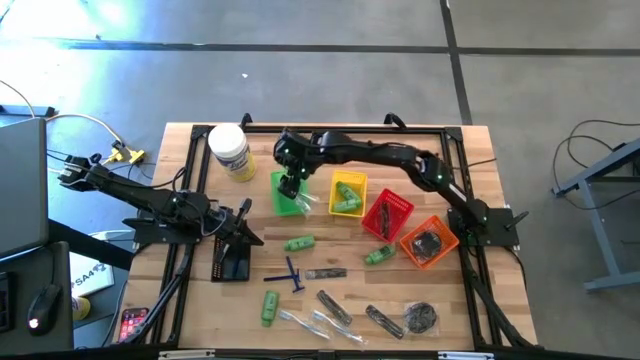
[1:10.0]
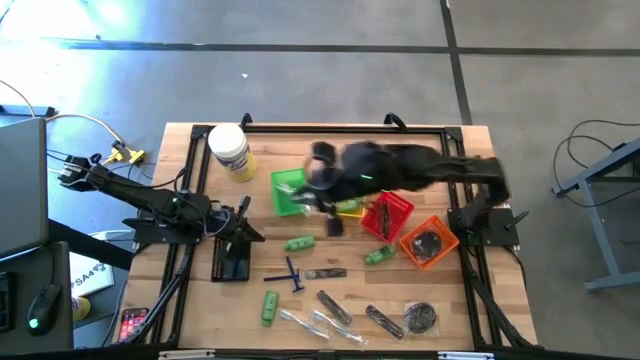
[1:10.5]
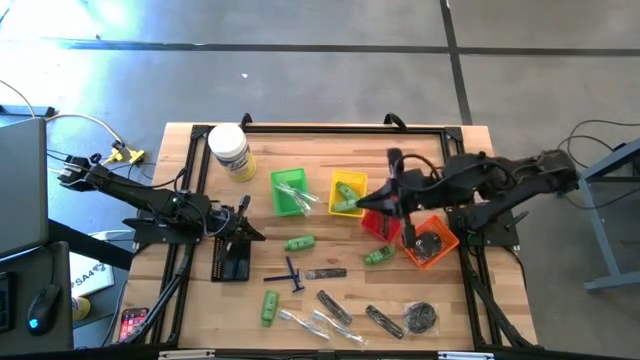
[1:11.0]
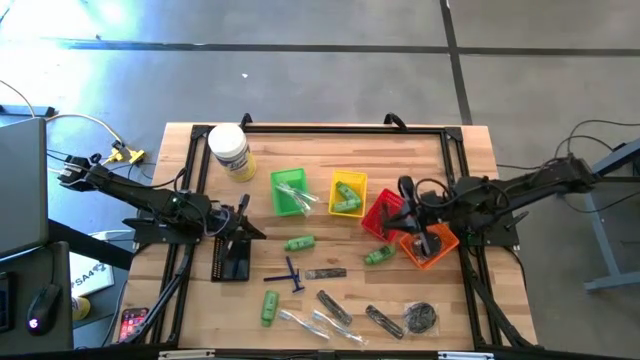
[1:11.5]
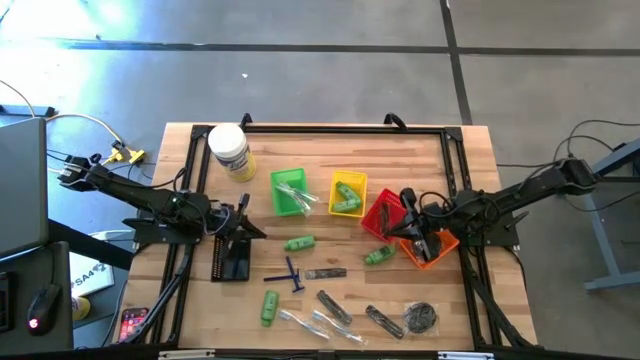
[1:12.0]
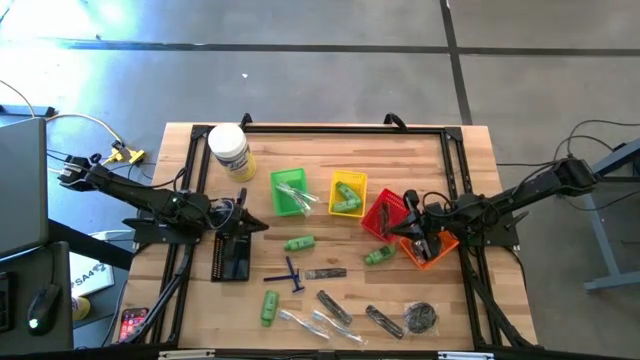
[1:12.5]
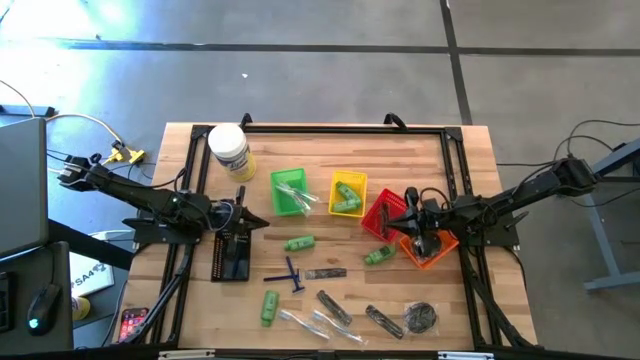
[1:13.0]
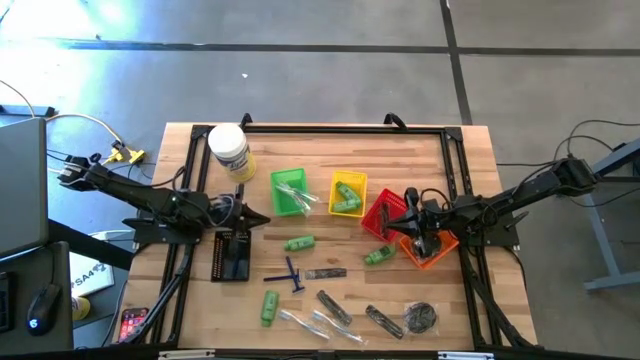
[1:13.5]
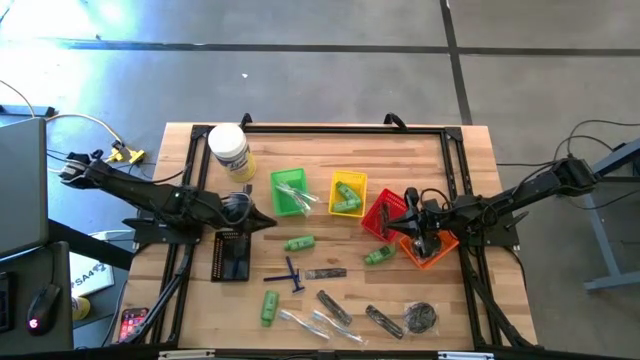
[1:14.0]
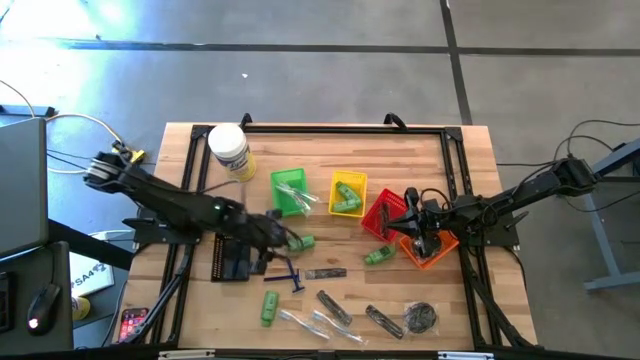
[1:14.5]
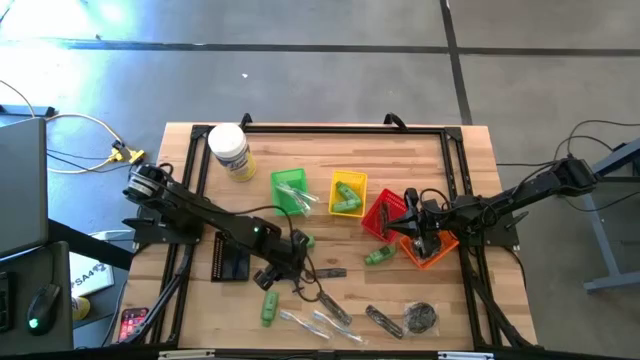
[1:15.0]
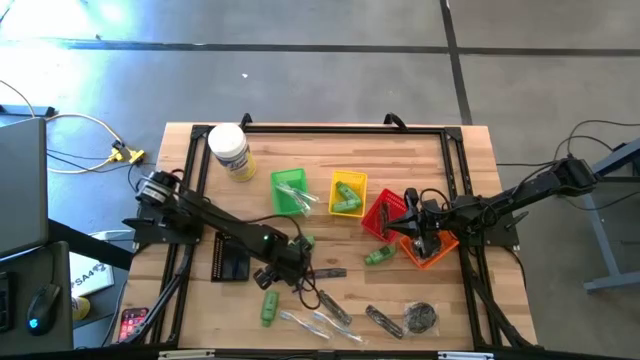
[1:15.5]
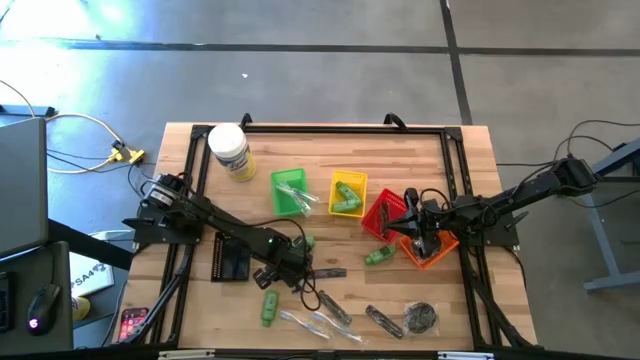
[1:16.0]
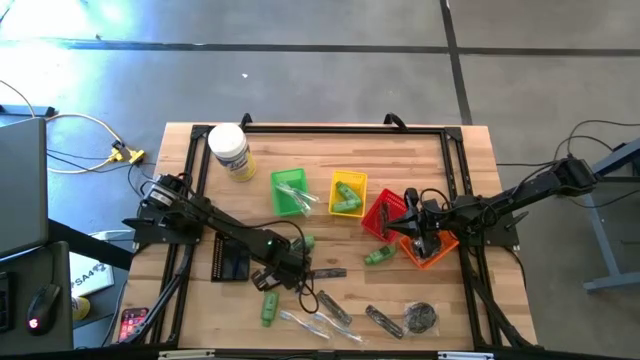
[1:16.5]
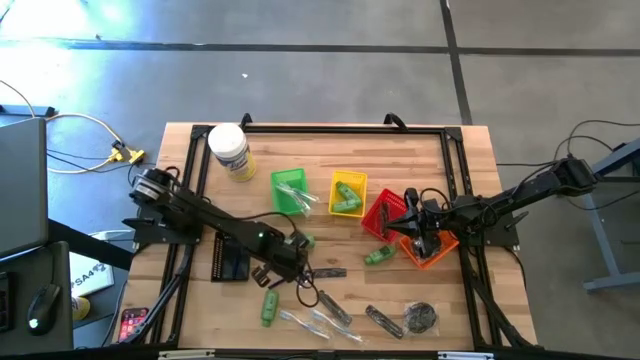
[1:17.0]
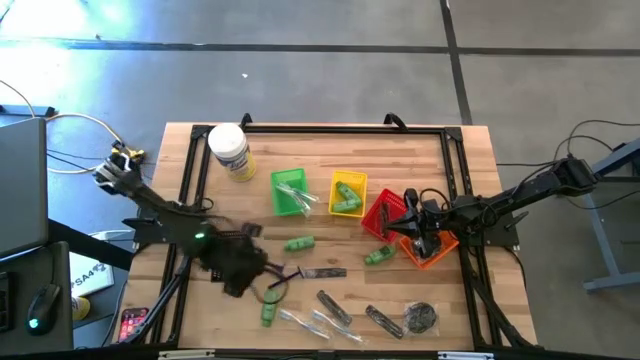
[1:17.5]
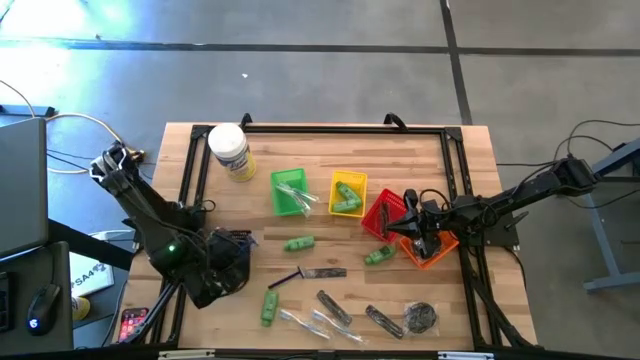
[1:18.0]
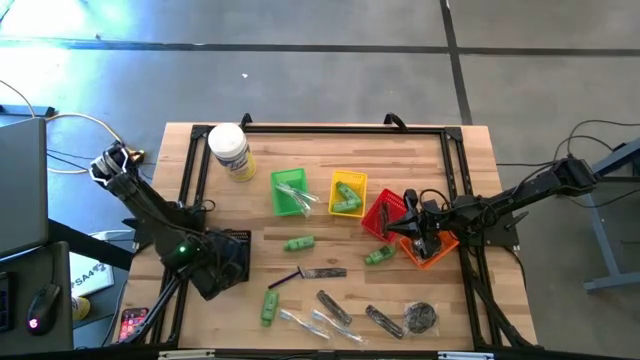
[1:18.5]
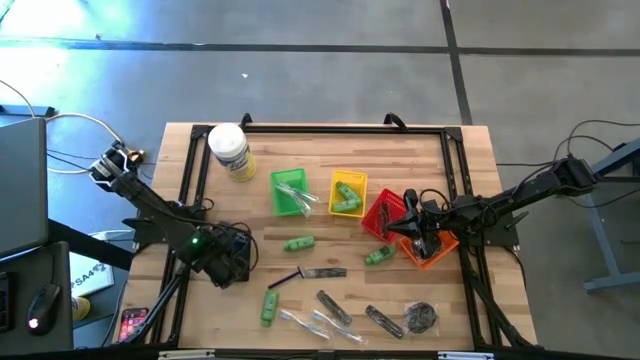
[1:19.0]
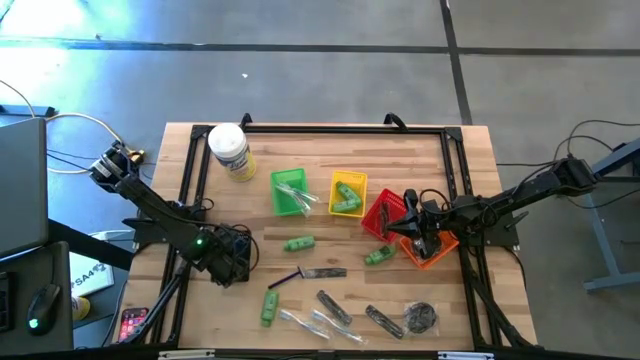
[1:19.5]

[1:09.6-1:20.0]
Task: Pick & Place Travel size toiletries
Put the blue razor into the black bin

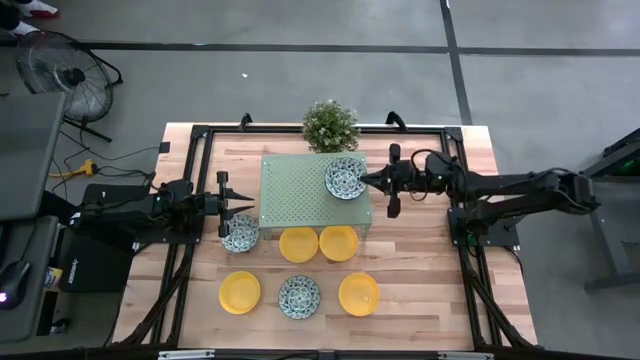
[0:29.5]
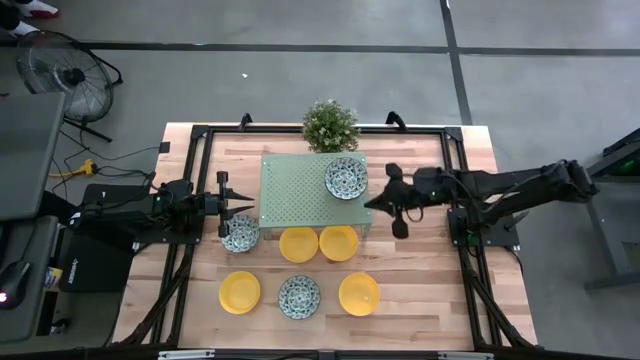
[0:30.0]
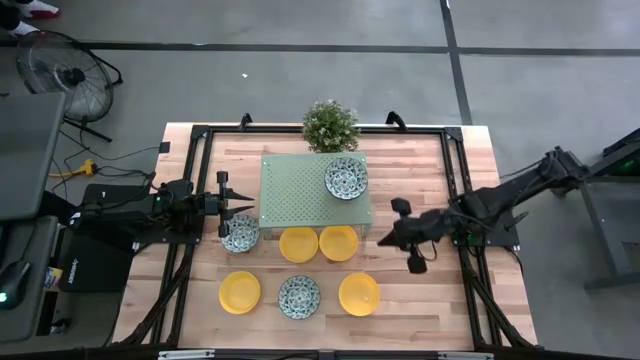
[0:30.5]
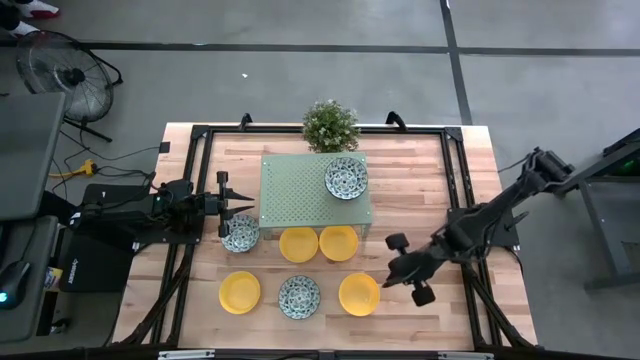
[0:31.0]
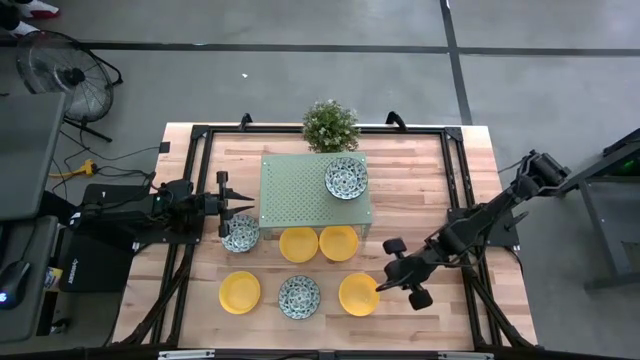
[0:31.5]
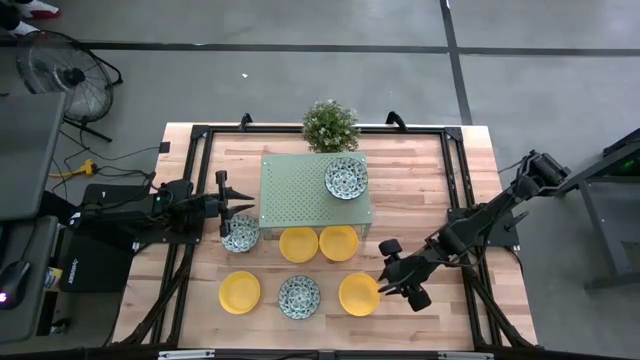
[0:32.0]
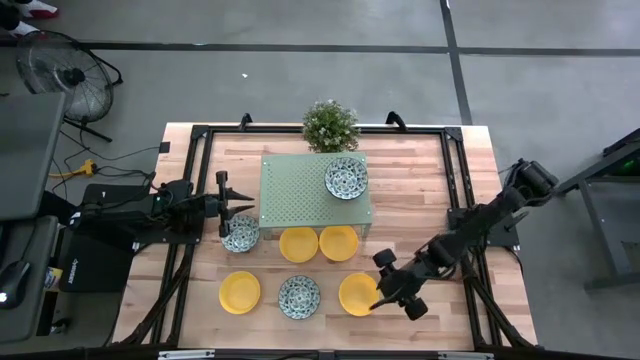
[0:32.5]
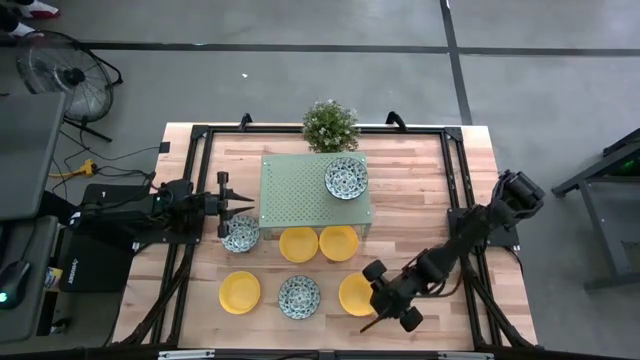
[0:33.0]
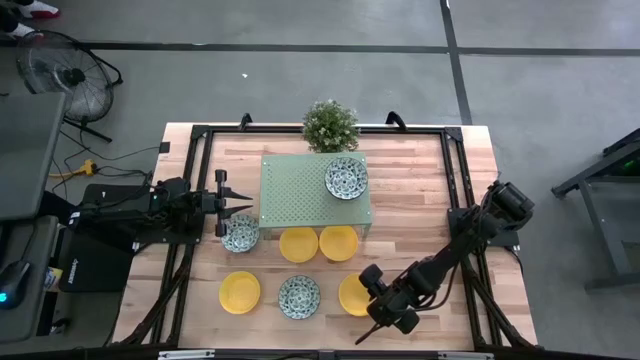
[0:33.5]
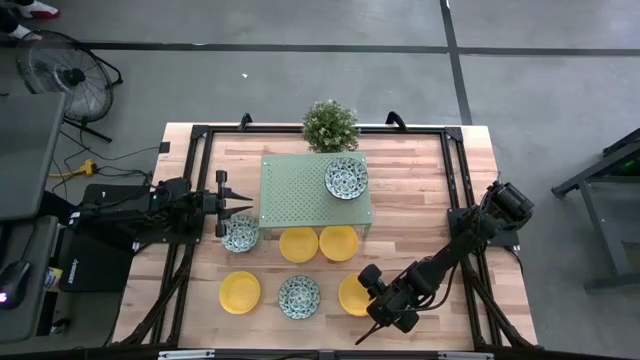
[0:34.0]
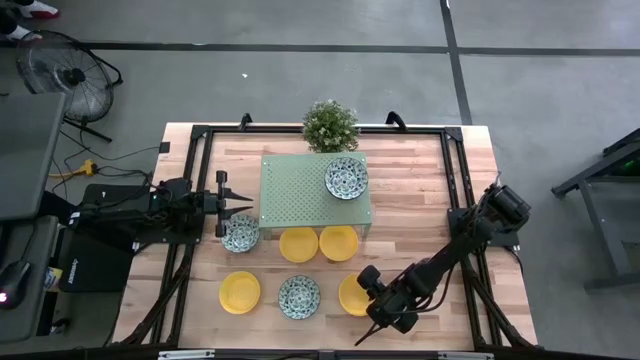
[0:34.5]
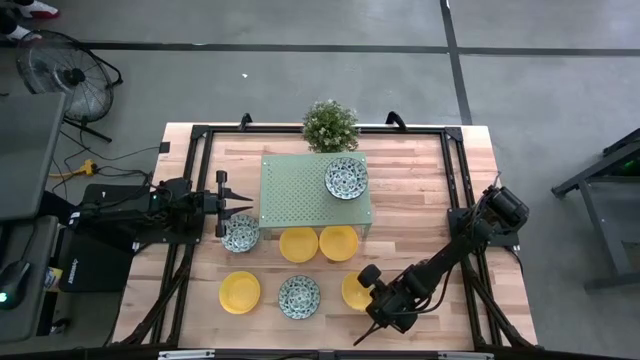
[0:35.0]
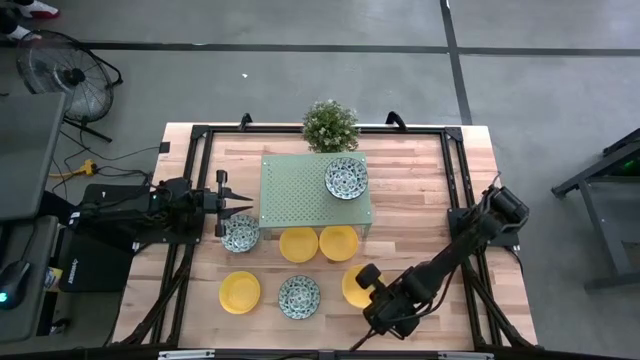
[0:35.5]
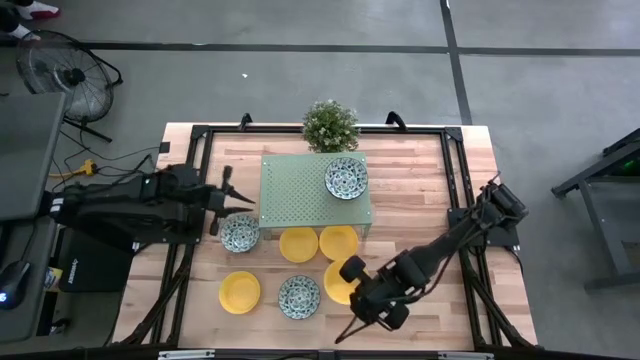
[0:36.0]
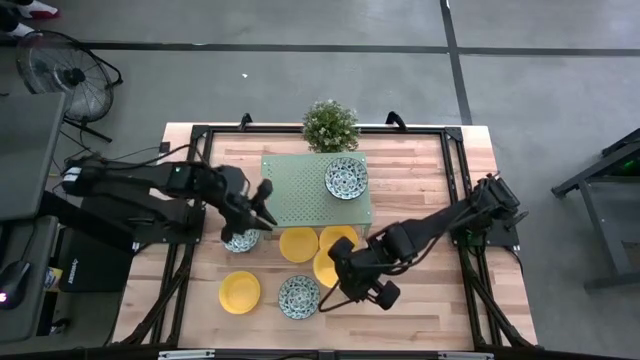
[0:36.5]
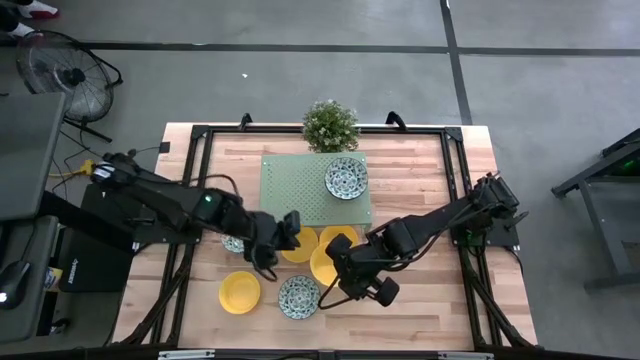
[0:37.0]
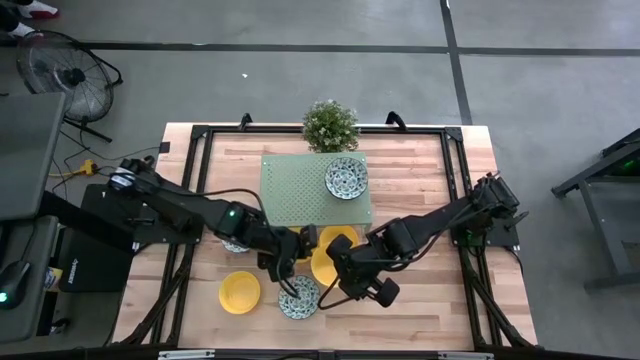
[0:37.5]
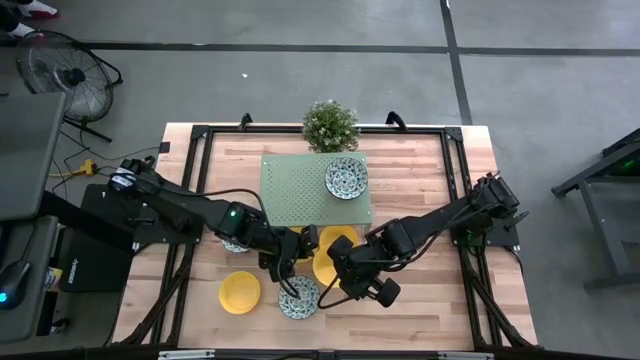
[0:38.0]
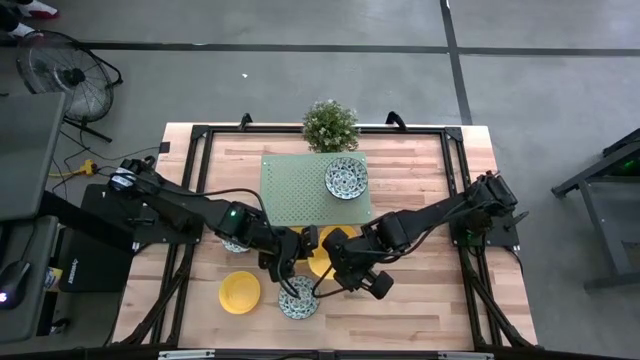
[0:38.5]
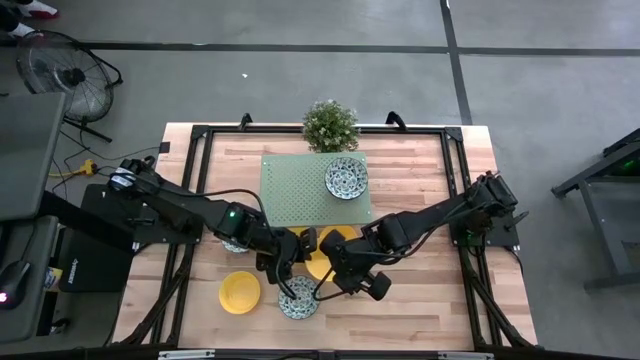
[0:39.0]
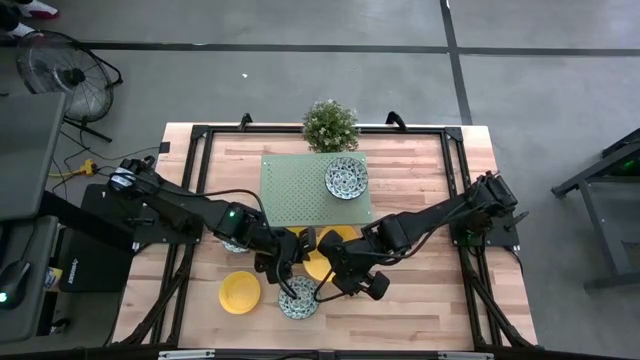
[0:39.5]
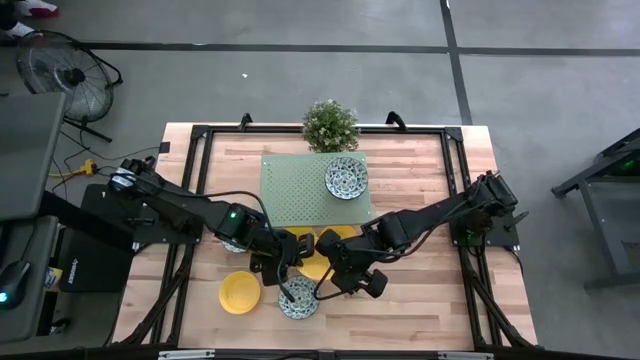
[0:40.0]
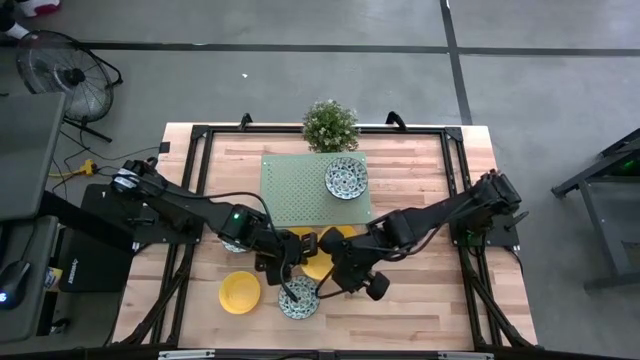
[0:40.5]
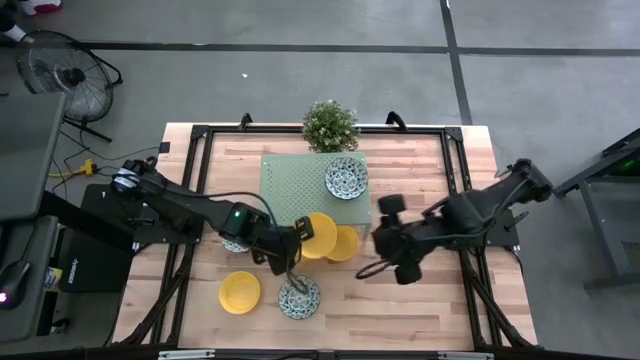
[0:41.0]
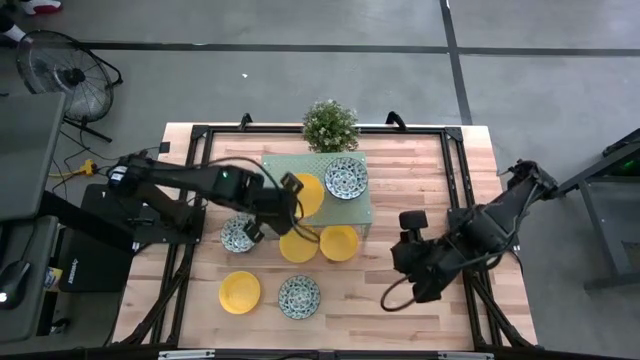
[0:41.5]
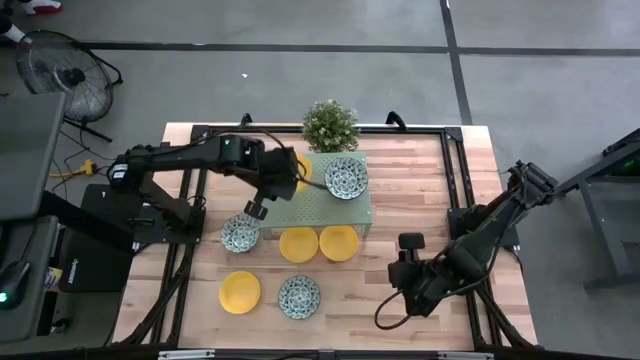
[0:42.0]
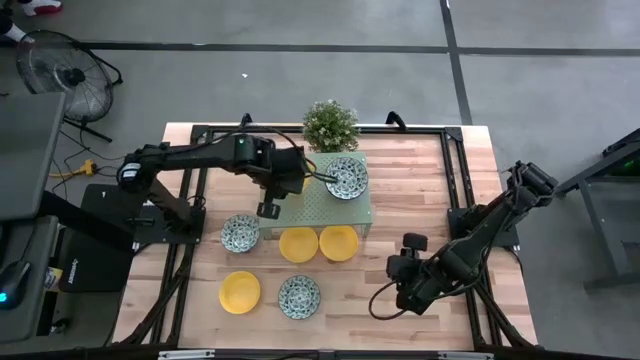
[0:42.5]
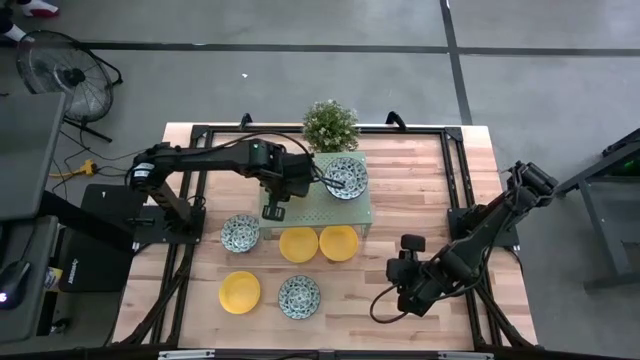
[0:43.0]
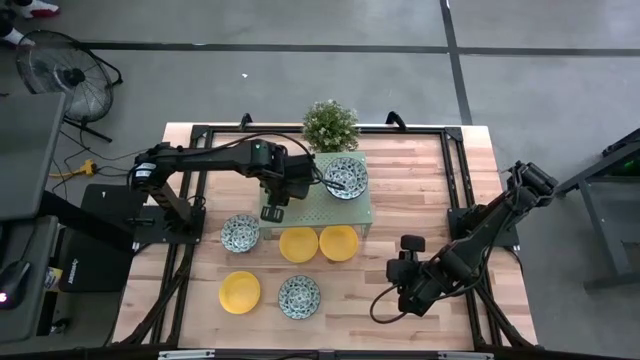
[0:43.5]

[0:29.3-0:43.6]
Task: Pick & Place Mini bowls
Put the yellow bowl on the shelf
